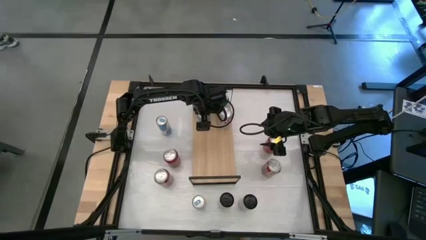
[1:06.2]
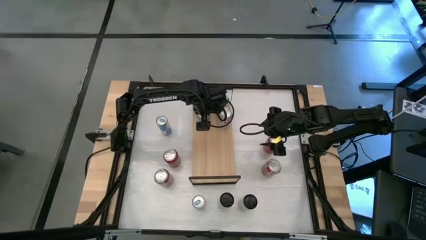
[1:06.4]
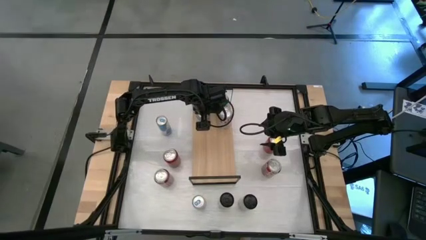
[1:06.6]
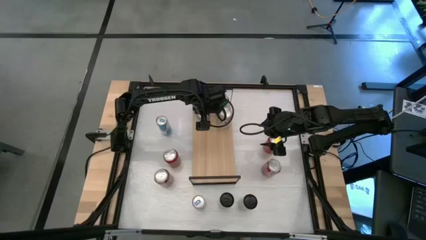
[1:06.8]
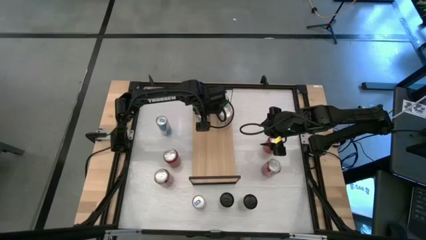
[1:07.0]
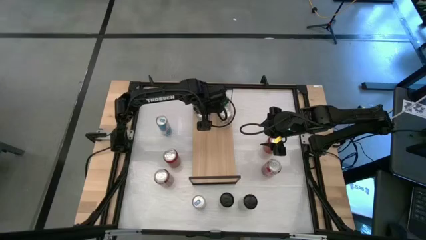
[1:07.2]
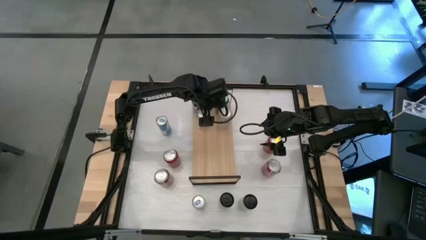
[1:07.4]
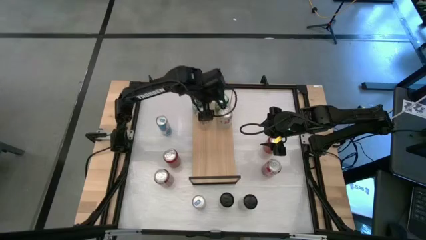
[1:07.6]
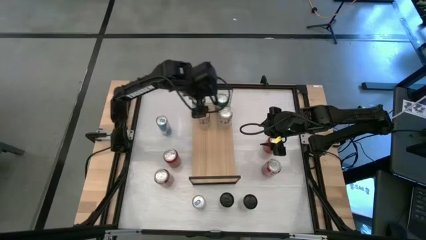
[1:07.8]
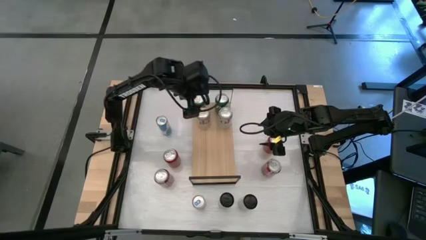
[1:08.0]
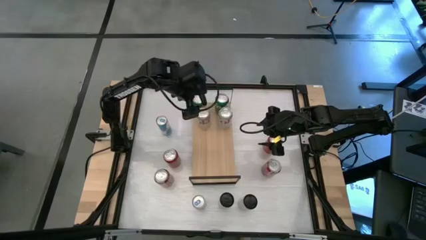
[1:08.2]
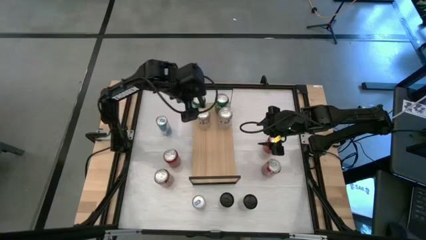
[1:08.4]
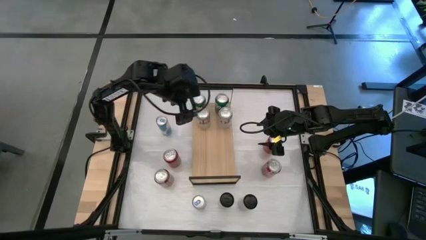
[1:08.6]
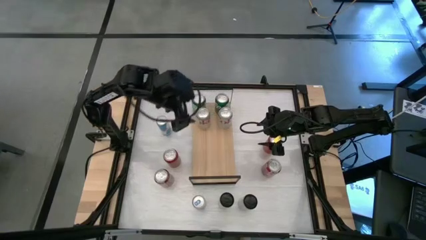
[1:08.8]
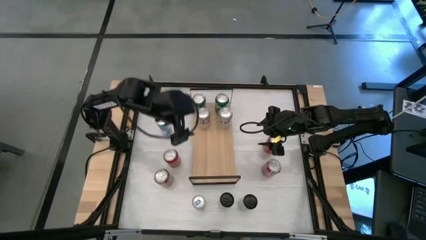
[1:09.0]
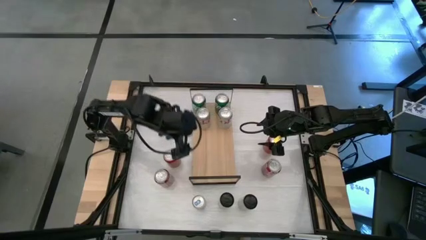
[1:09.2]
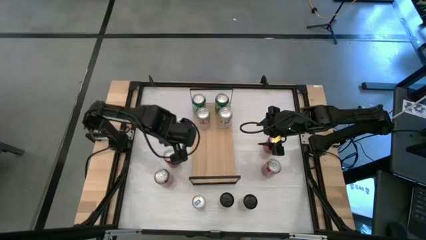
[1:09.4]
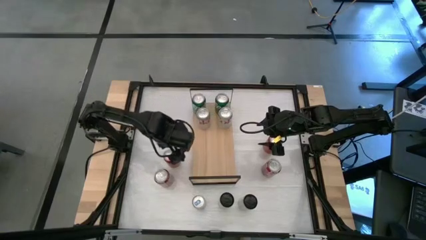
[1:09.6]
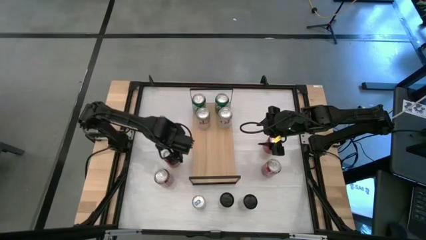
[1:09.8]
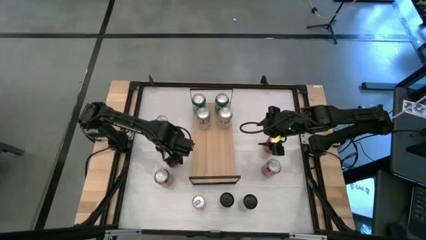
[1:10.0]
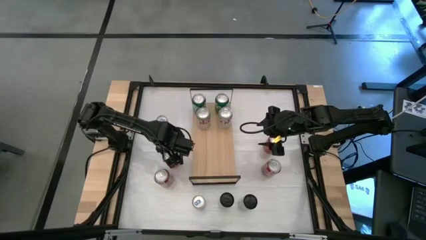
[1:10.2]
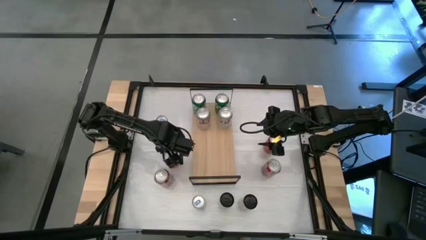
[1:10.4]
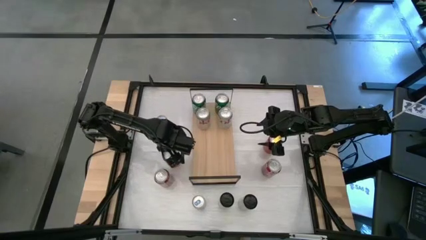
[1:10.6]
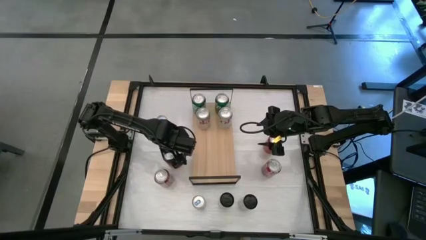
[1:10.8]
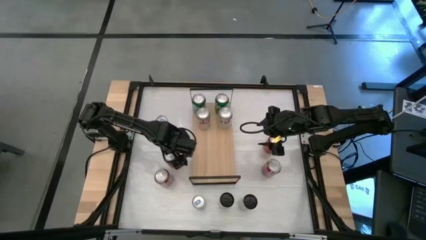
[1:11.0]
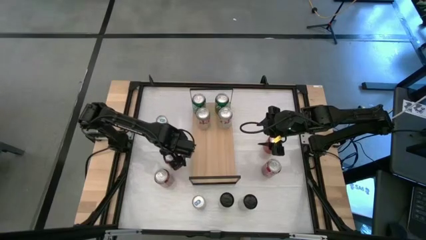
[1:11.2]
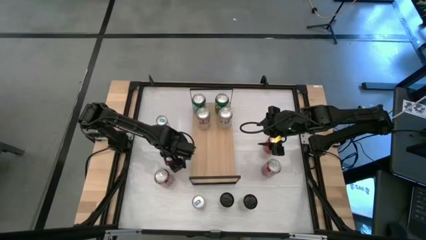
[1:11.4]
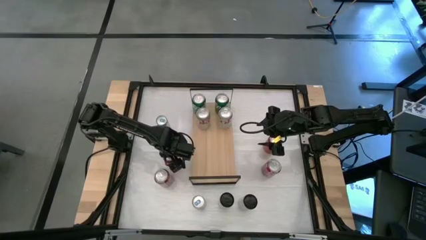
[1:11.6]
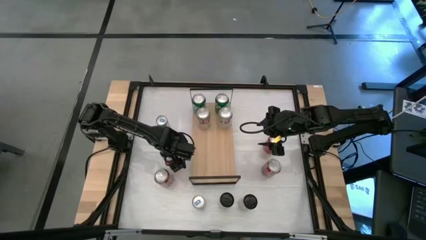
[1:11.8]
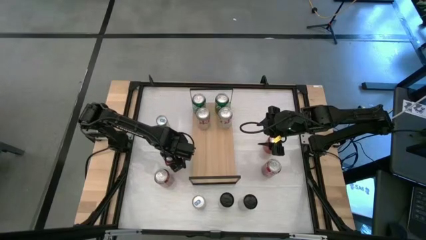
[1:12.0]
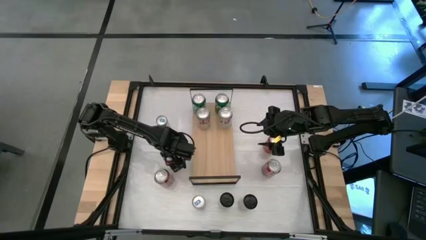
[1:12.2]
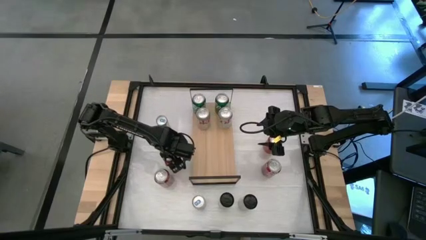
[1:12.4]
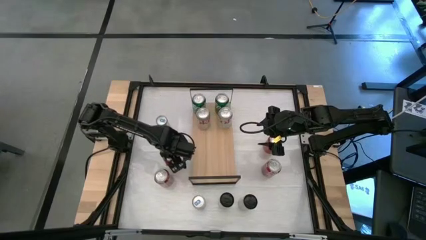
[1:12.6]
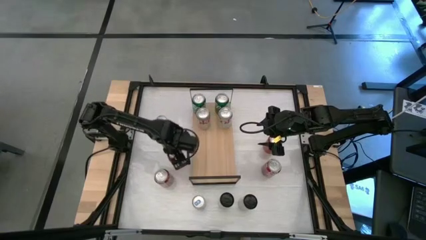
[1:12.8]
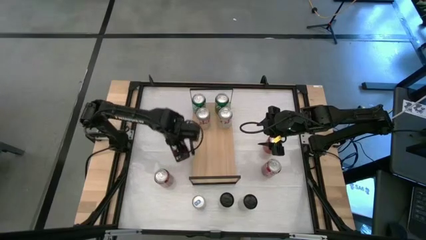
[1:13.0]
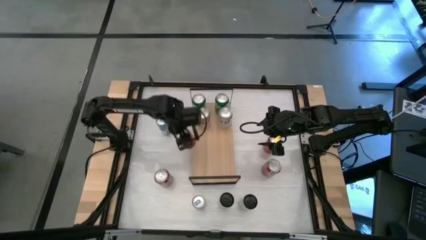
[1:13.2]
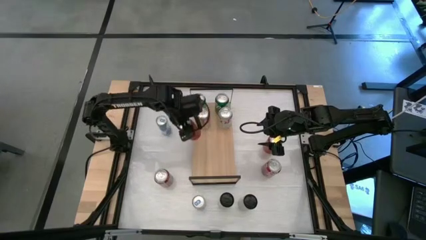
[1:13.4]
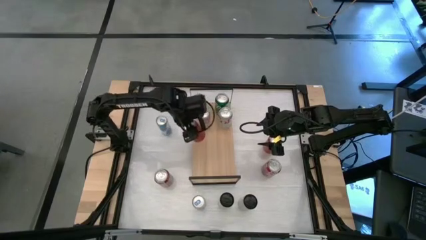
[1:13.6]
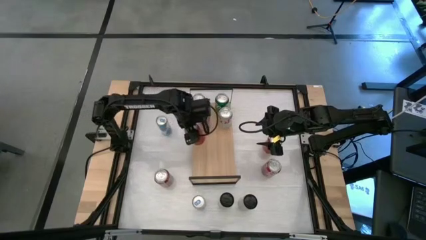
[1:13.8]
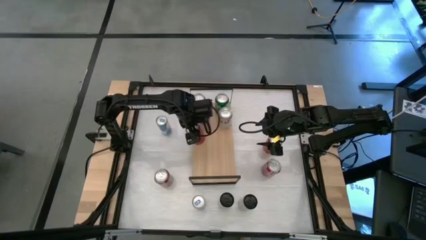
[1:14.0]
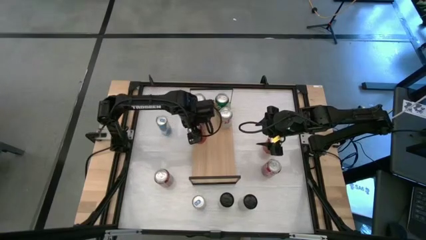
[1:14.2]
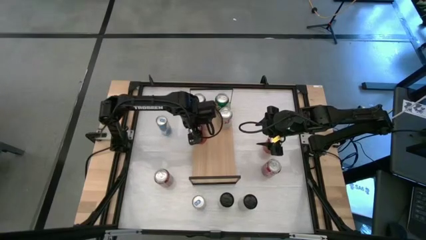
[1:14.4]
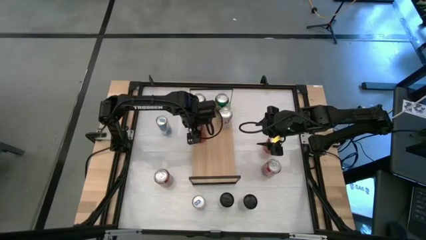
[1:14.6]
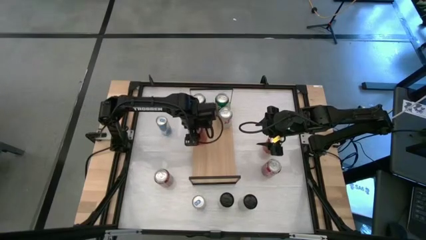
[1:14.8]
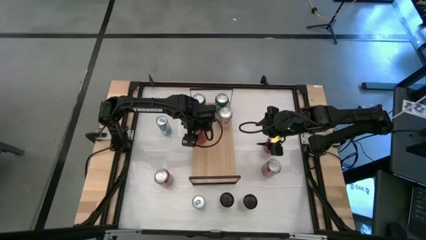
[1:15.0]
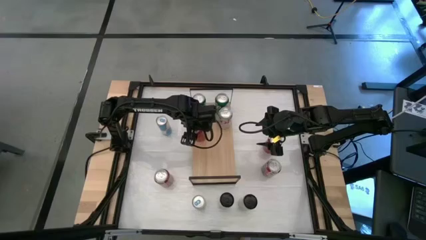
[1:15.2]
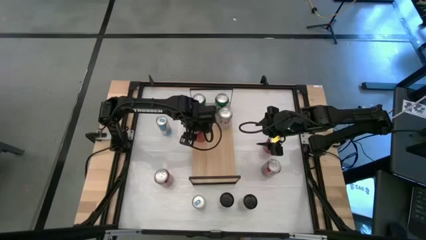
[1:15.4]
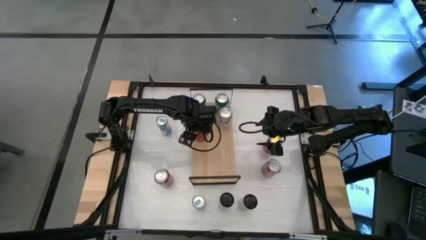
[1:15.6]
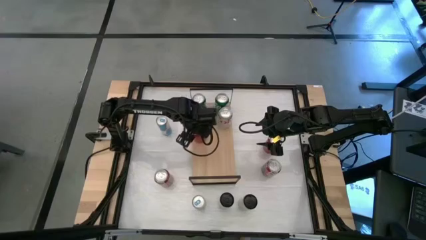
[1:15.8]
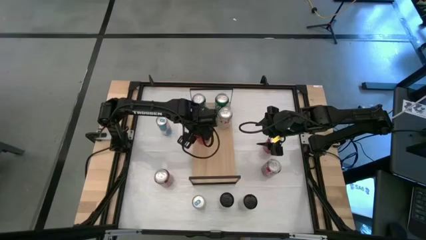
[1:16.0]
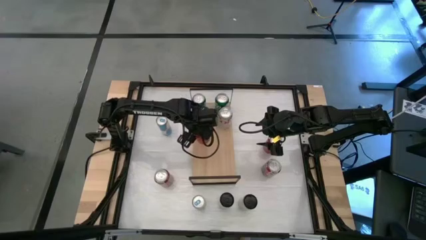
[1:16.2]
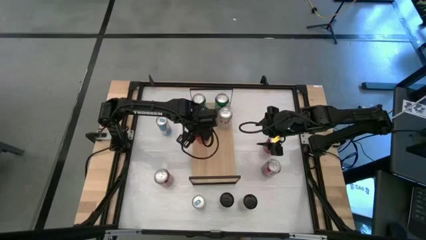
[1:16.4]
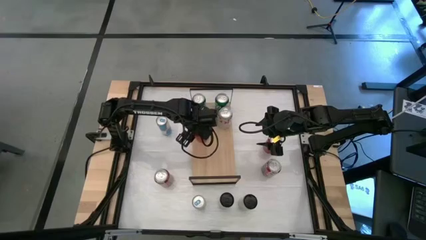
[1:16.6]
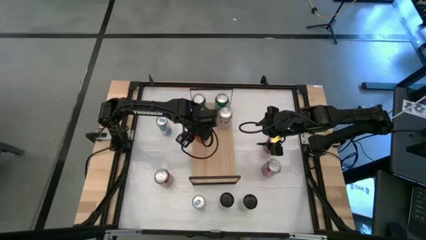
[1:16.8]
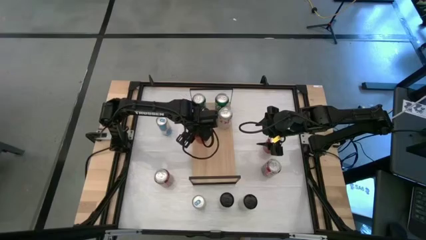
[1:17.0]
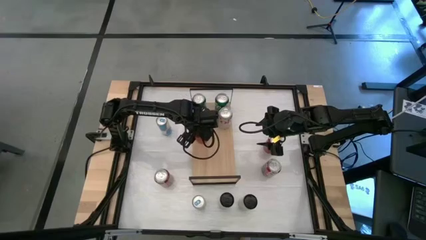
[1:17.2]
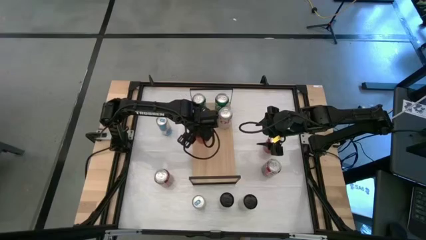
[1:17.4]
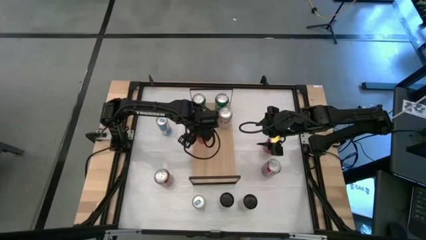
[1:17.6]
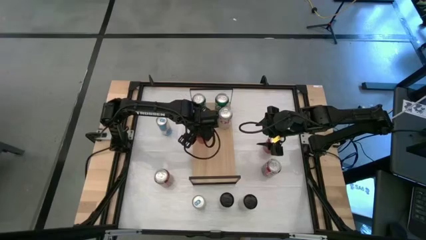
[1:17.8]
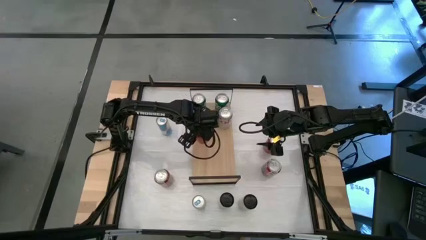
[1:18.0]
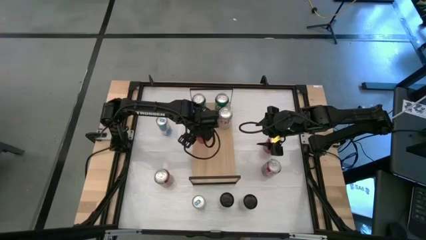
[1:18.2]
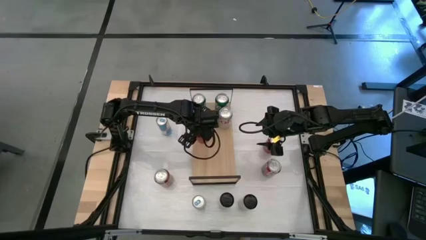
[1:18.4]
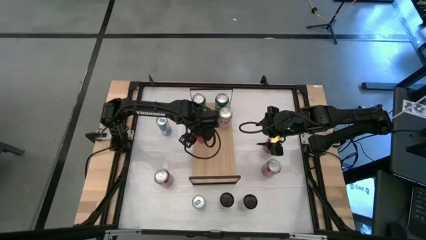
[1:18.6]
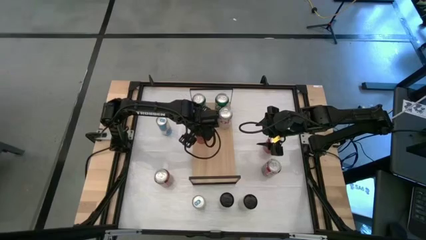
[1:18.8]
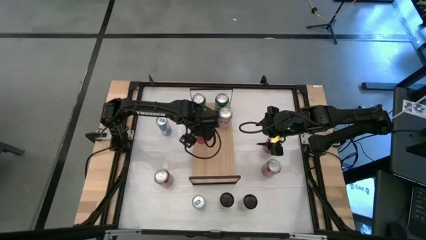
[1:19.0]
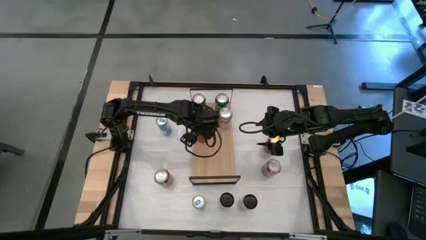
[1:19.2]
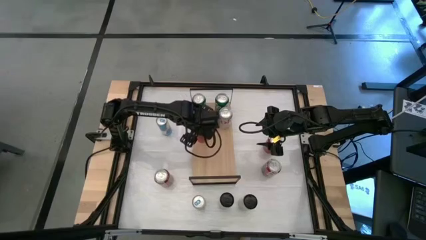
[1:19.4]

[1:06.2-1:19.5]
Task: Place canned beverage on shelf
Put the left black soda can on the shelf
